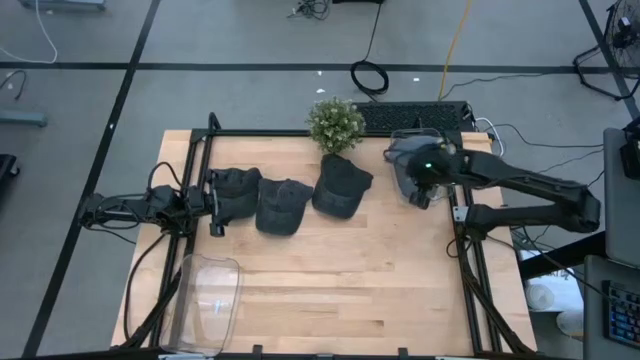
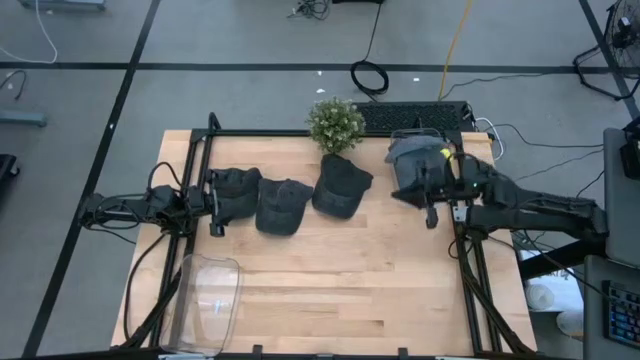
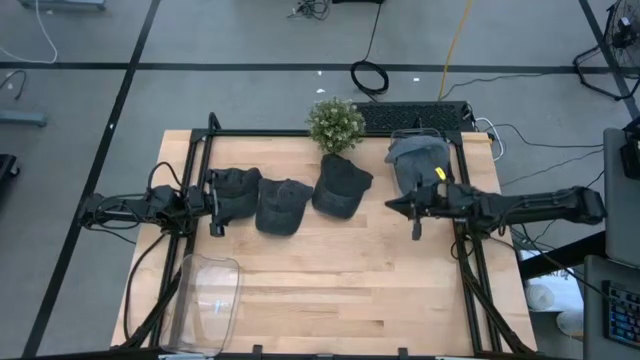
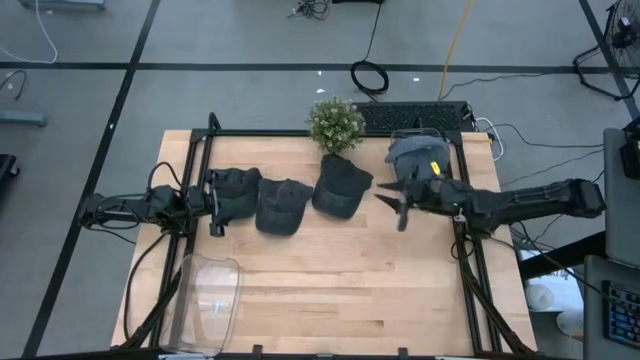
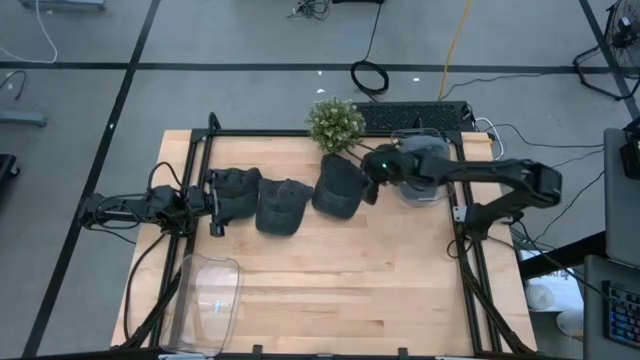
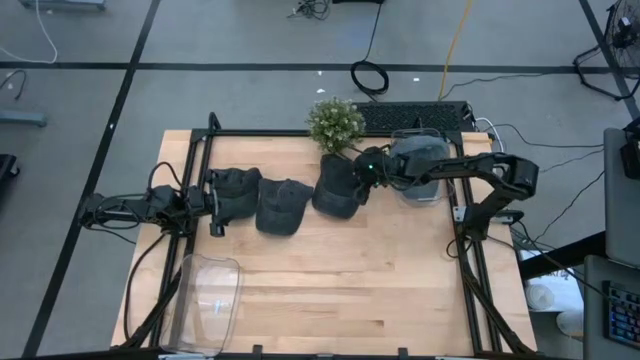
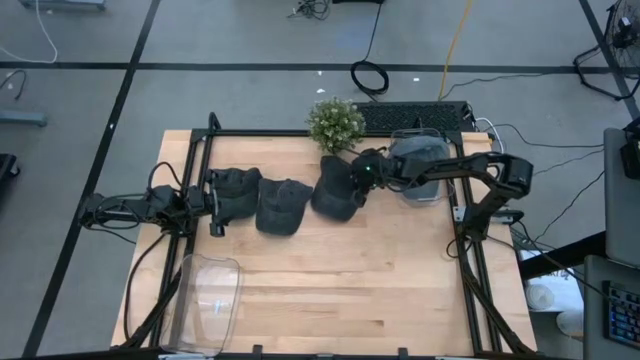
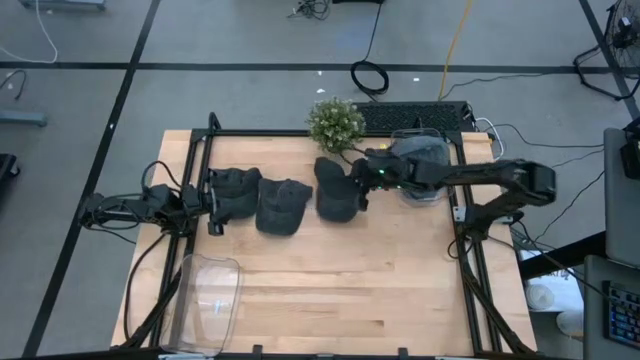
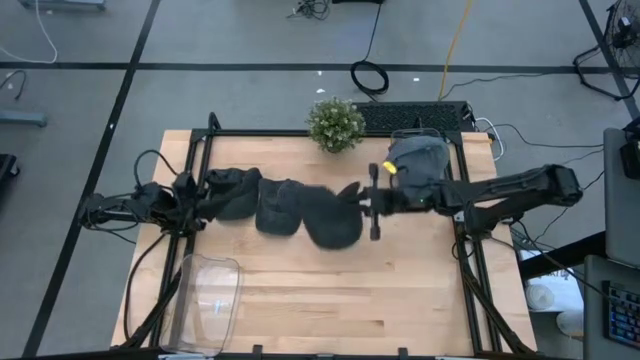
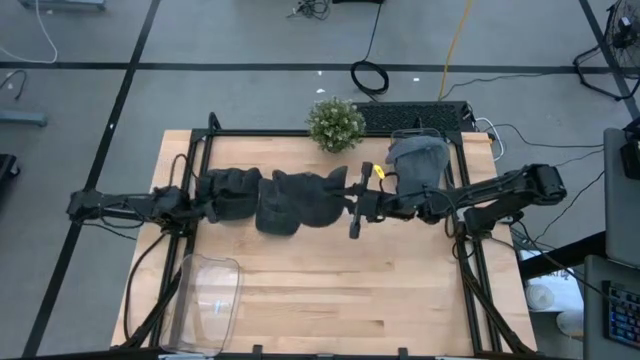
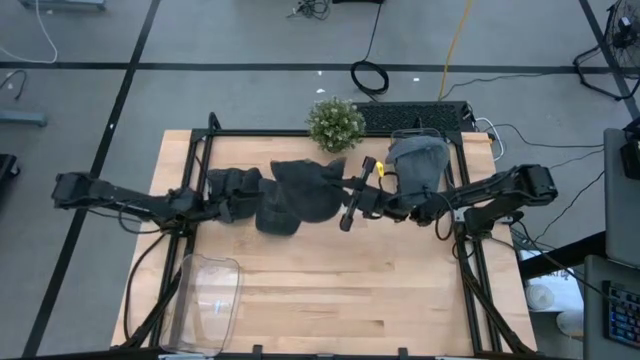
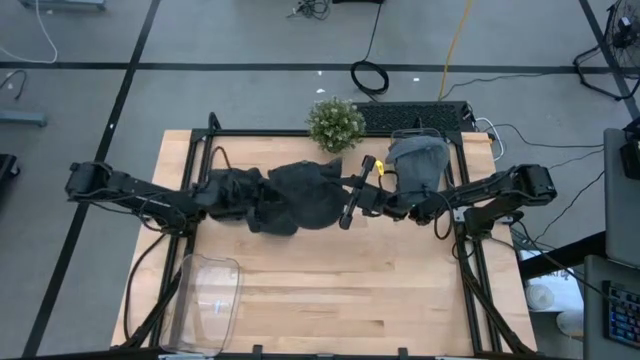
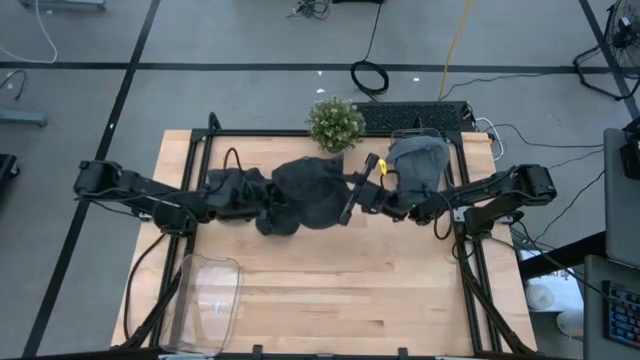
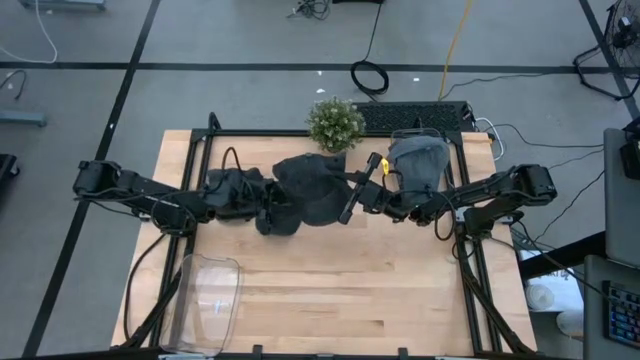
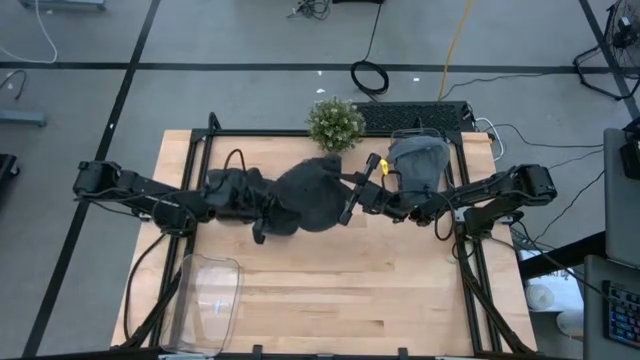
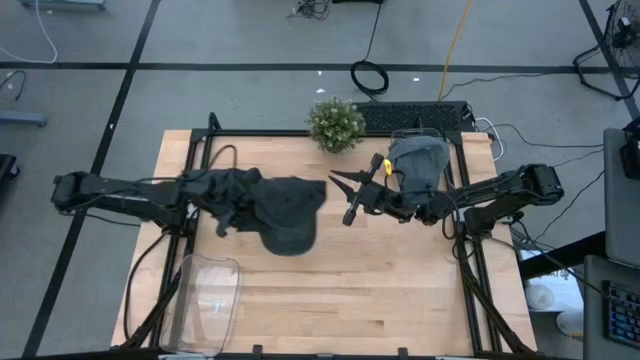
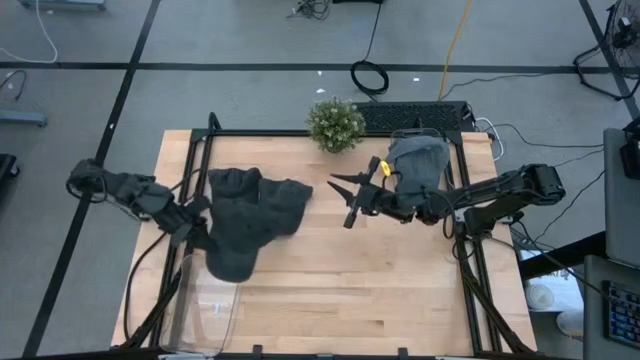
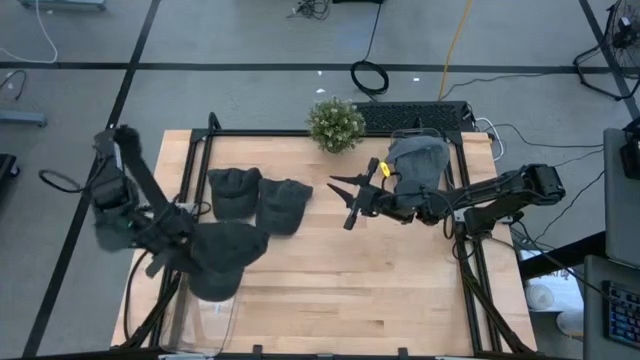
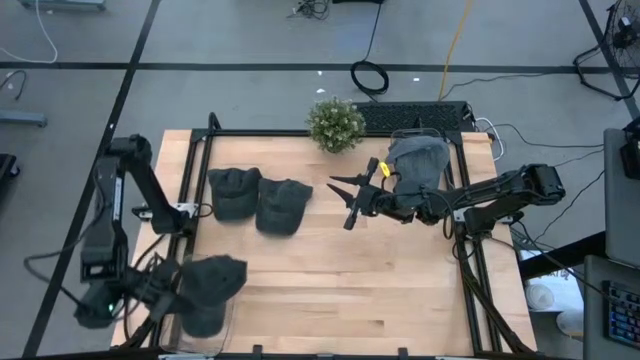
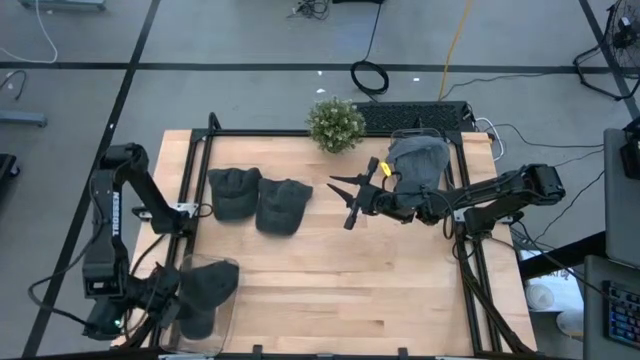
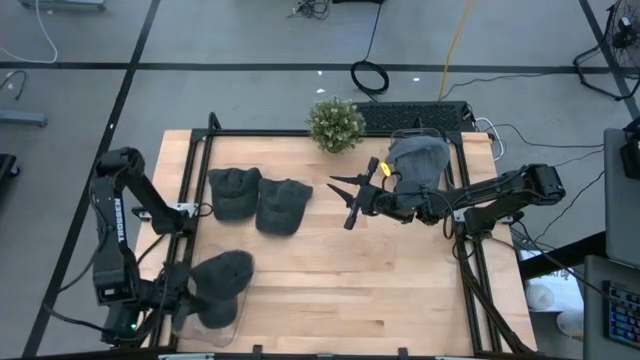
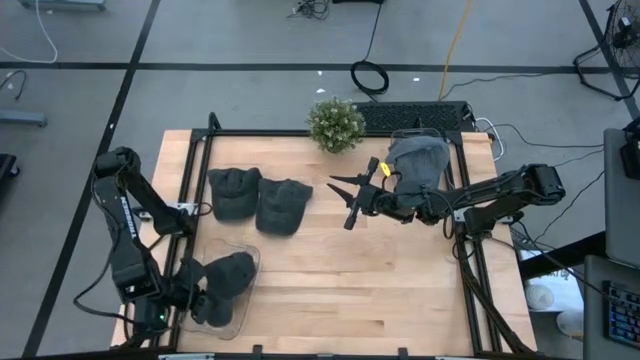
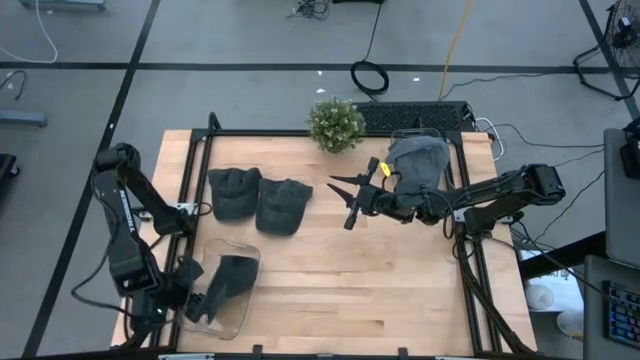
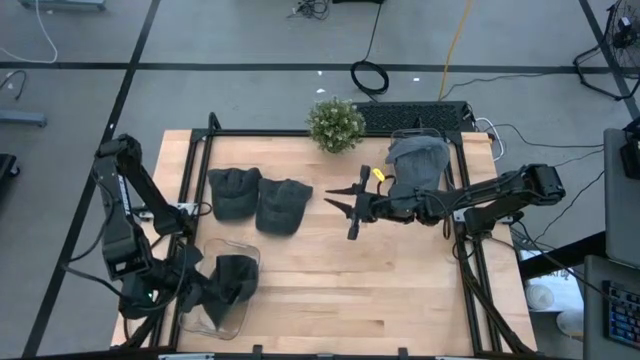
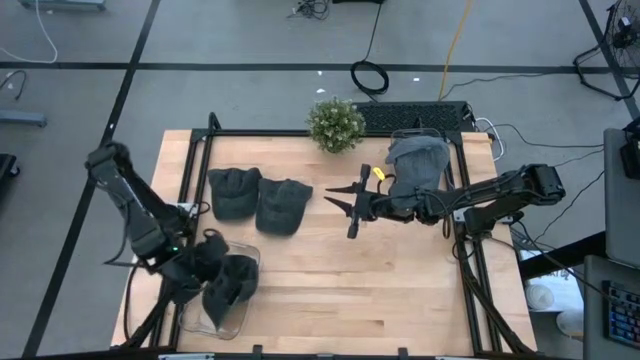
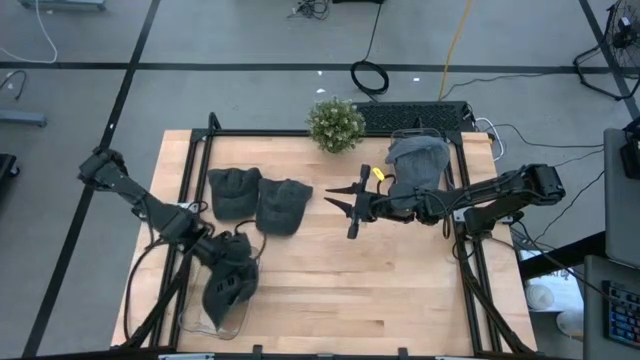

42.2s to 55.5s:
Task: Pick & Place hat
Put the right black cap into the bottom transparent bin

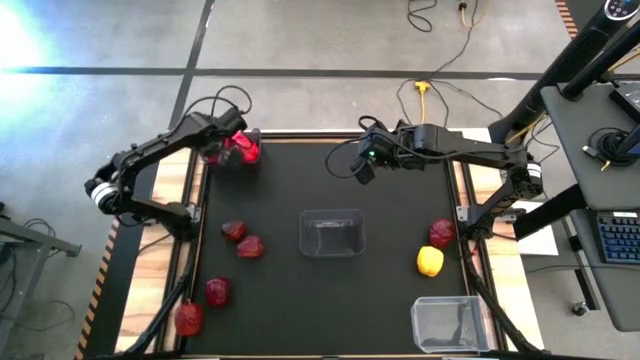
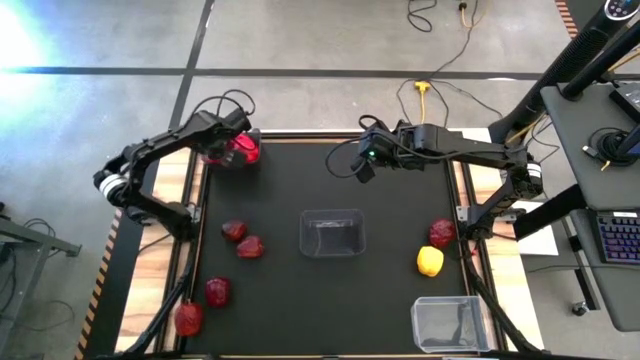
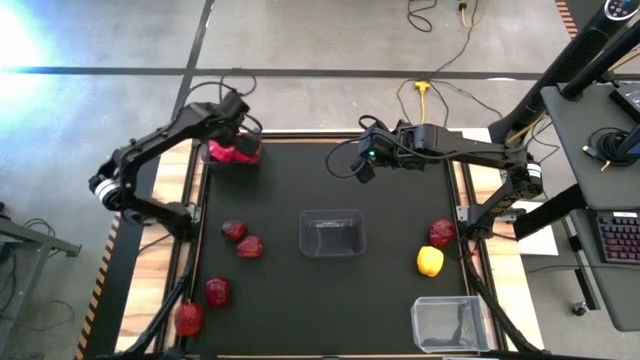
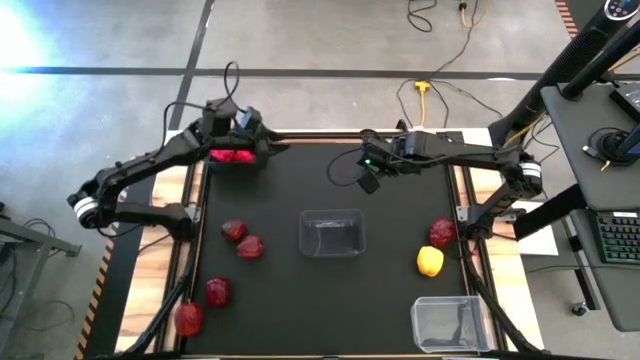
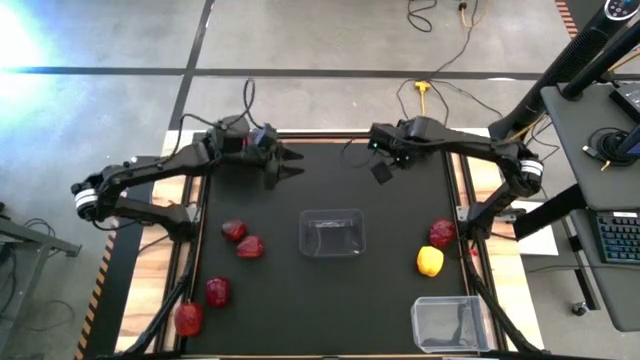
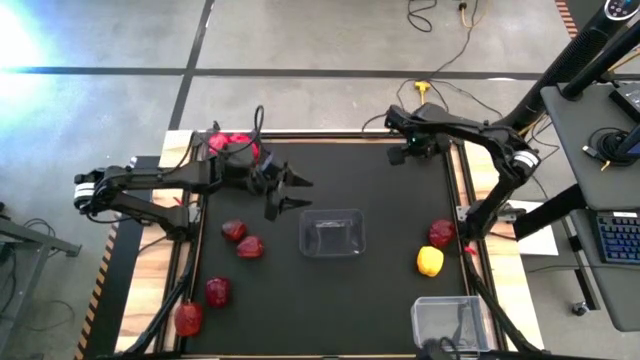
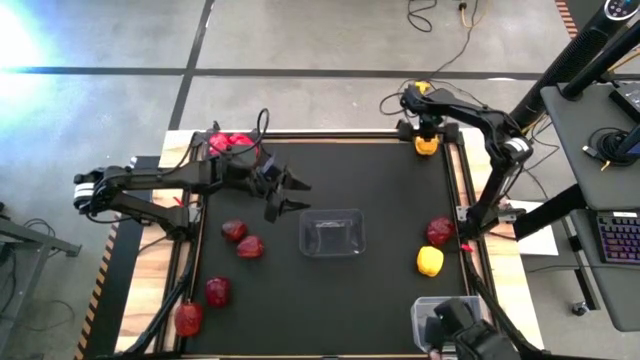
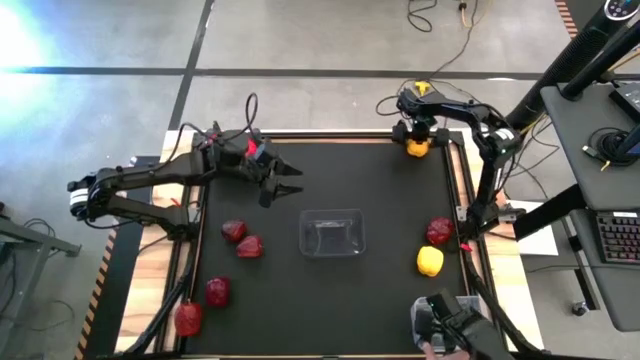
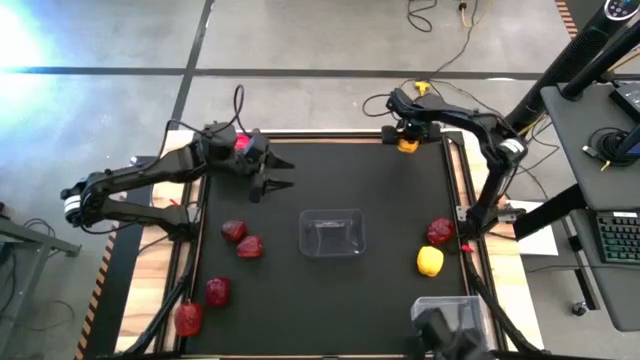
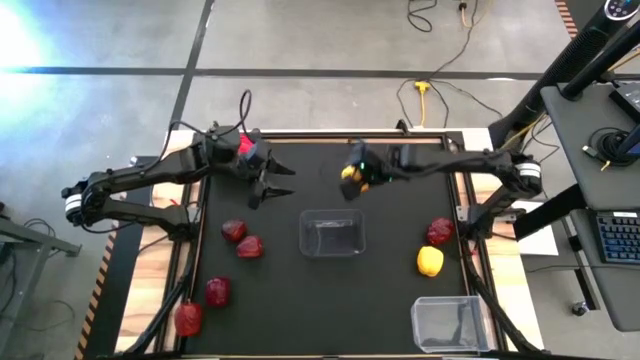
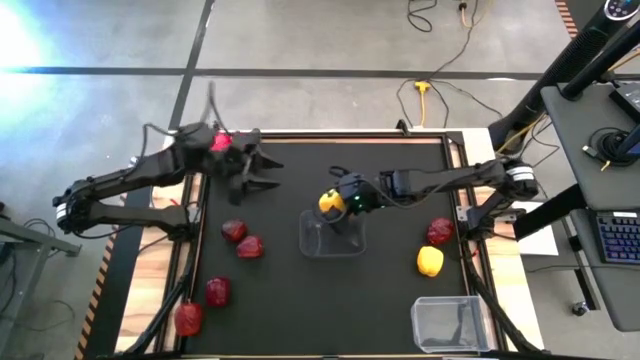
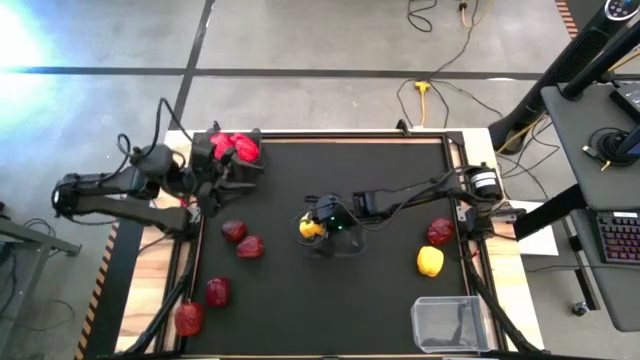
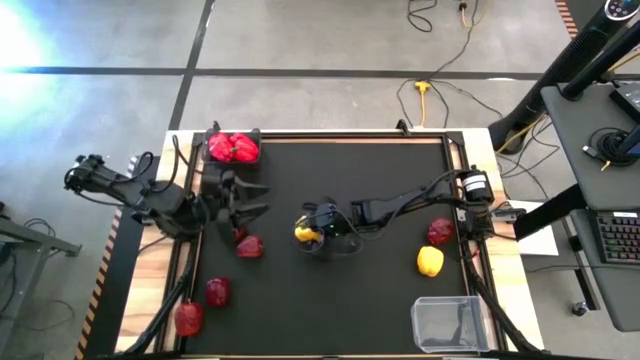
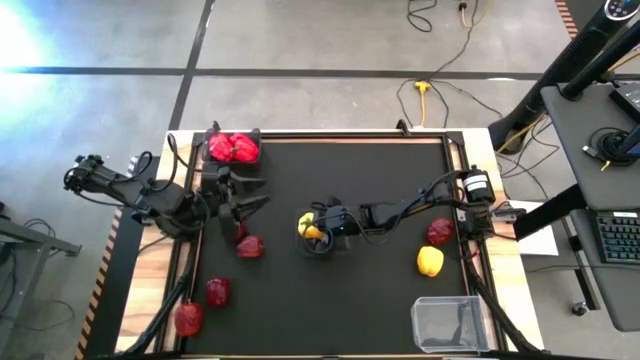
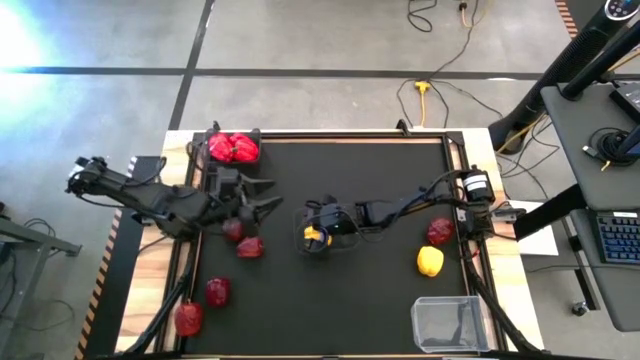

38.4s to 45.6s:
Task: Sort produce into baskets
Put the yellow bell pepper into the bottom black bin

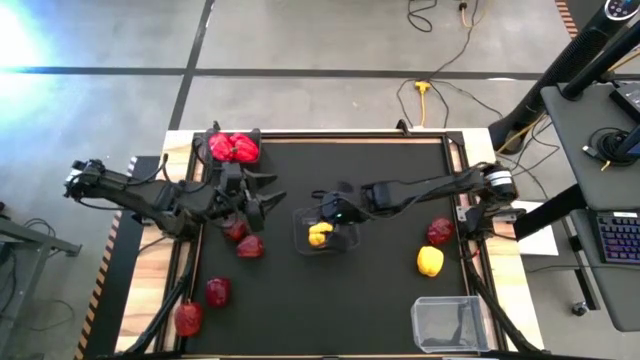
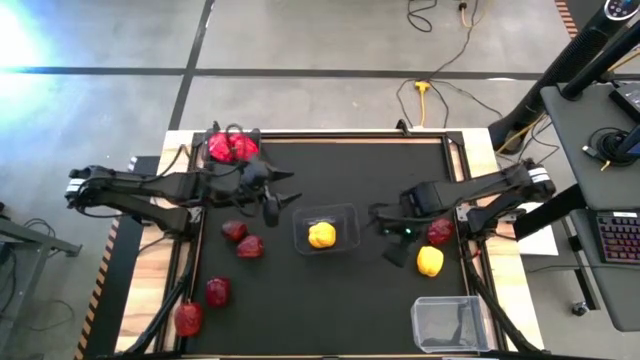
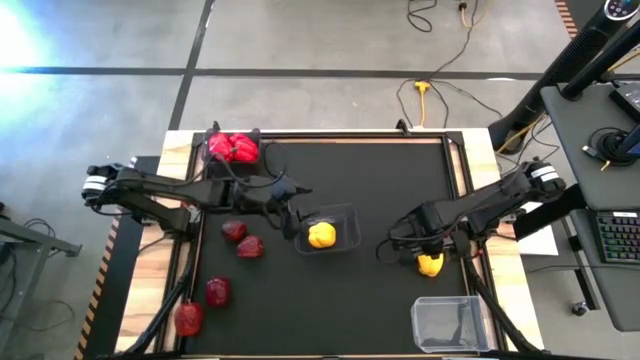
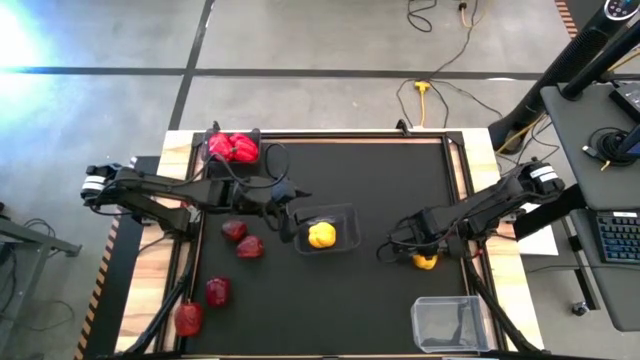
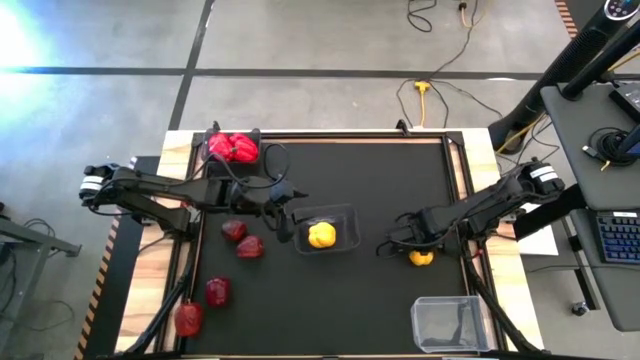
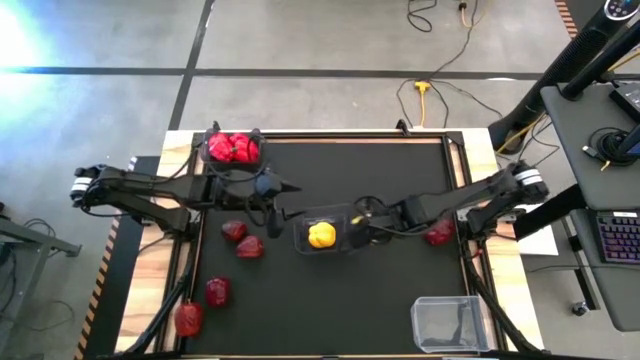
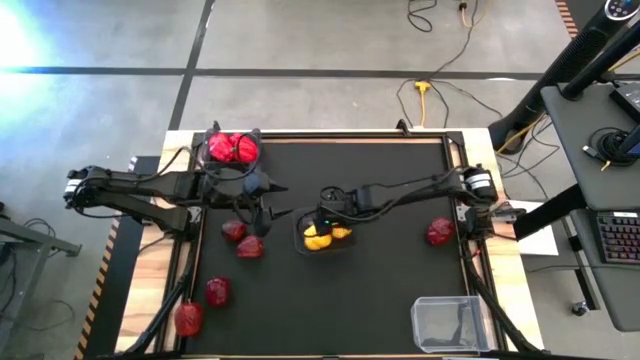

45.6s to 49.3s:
Put the yellow bell pepper into the bottom black bin
